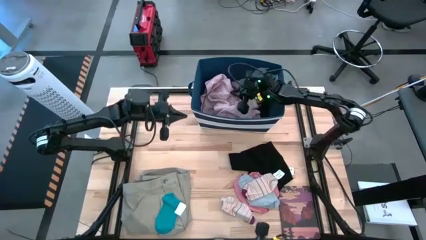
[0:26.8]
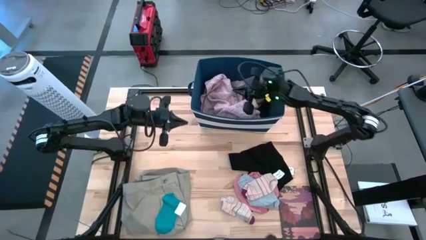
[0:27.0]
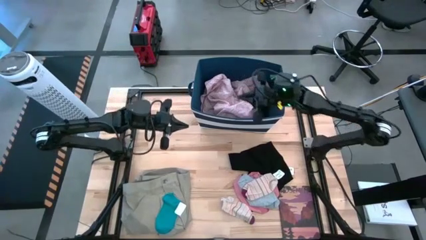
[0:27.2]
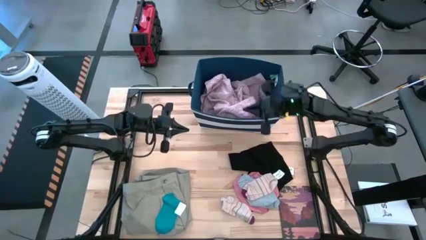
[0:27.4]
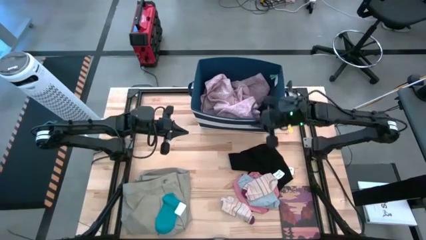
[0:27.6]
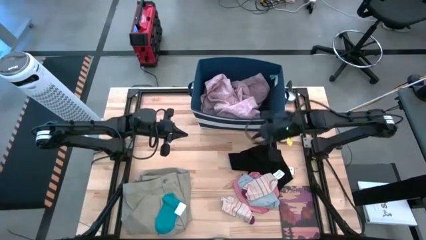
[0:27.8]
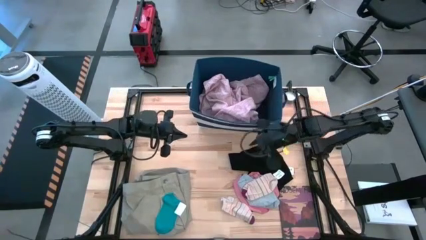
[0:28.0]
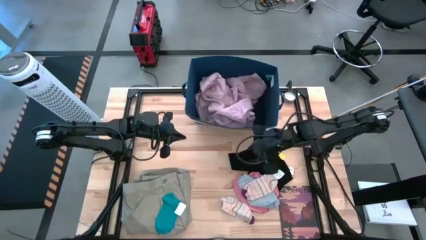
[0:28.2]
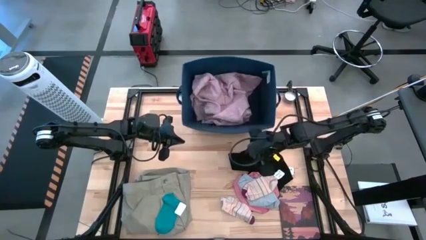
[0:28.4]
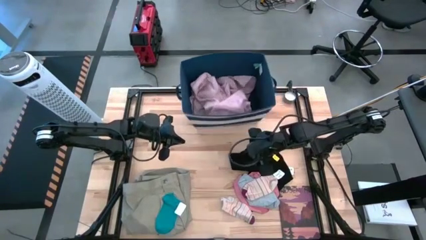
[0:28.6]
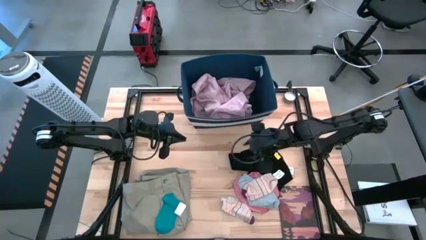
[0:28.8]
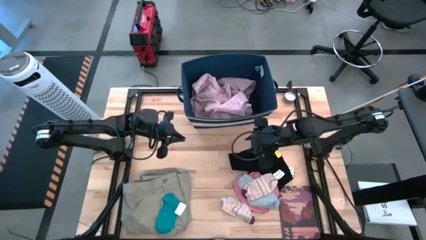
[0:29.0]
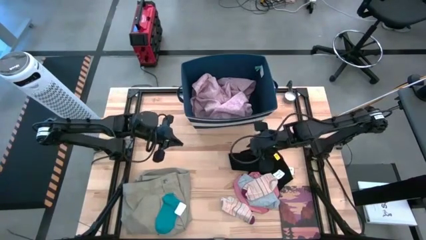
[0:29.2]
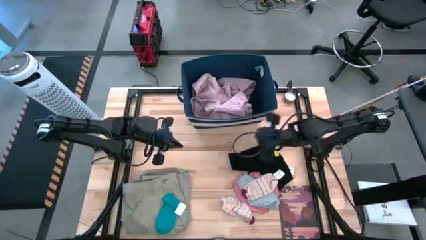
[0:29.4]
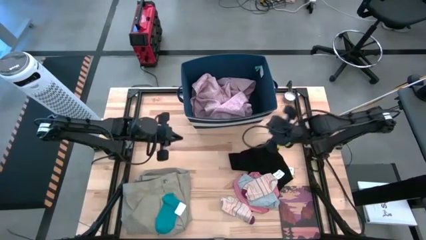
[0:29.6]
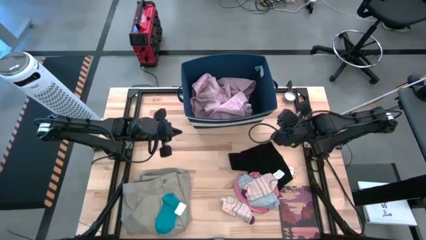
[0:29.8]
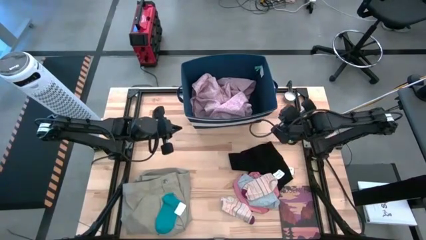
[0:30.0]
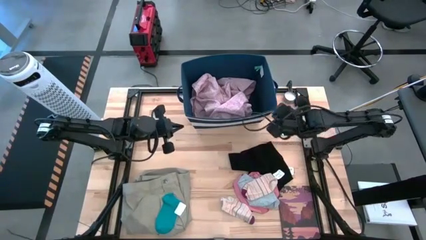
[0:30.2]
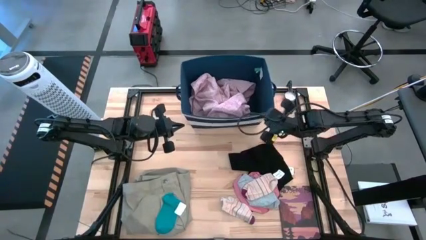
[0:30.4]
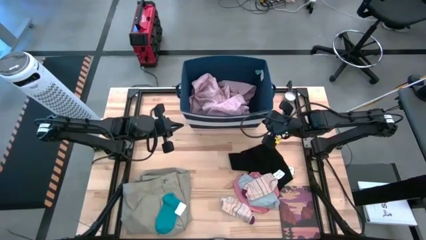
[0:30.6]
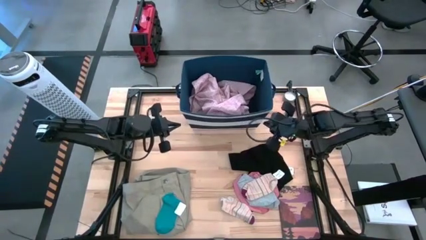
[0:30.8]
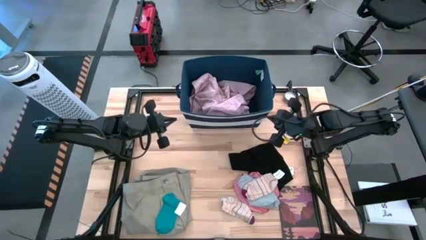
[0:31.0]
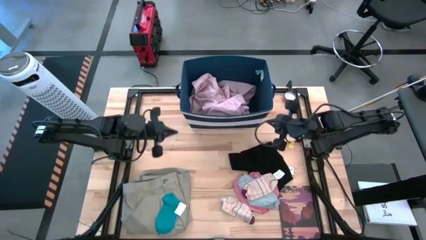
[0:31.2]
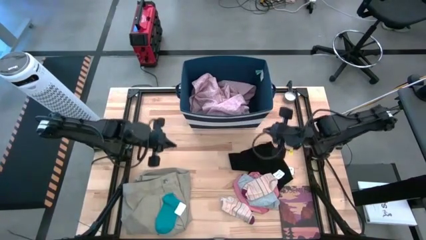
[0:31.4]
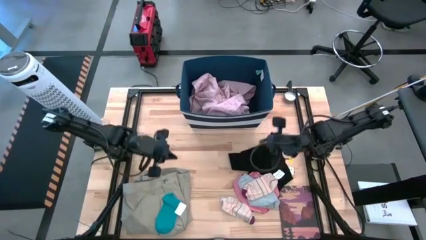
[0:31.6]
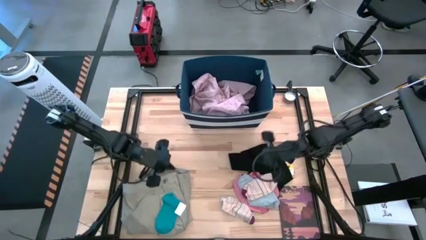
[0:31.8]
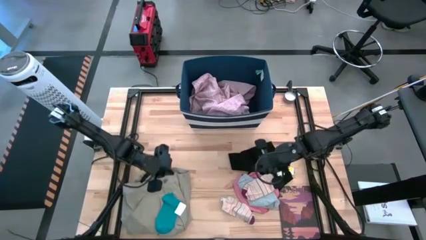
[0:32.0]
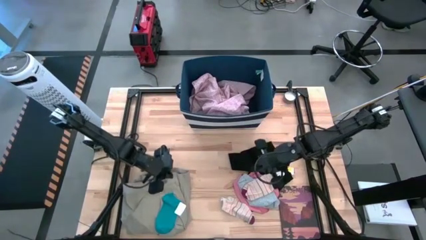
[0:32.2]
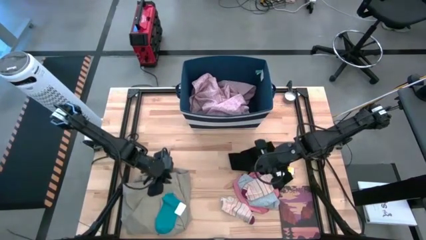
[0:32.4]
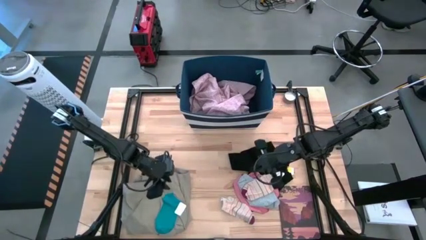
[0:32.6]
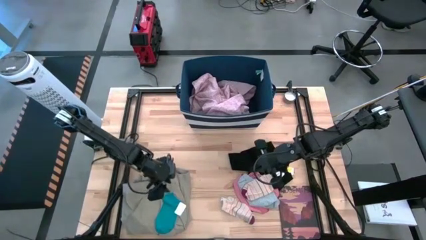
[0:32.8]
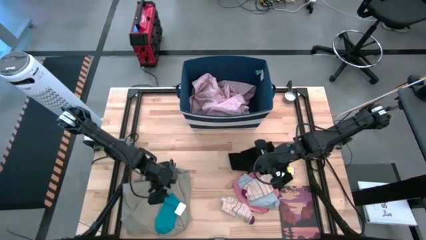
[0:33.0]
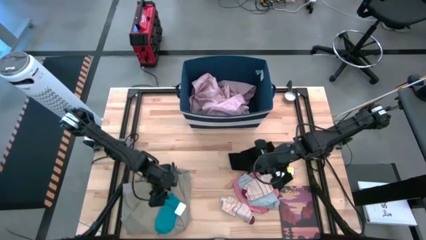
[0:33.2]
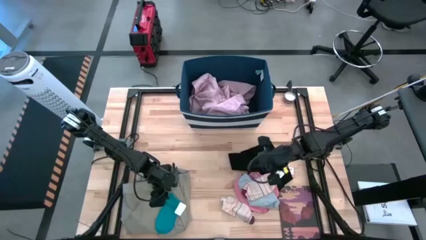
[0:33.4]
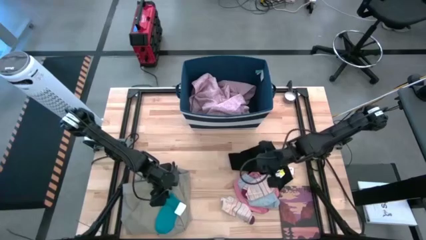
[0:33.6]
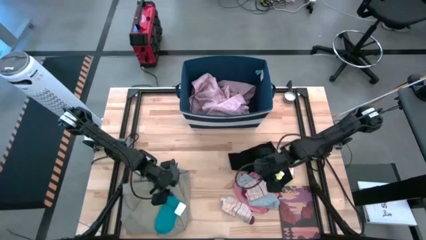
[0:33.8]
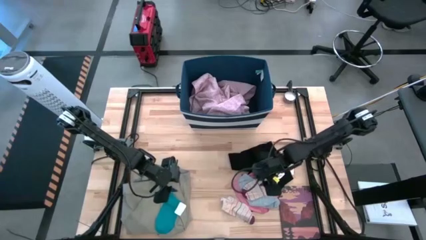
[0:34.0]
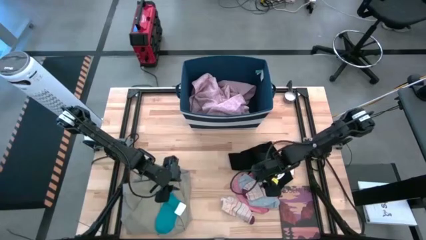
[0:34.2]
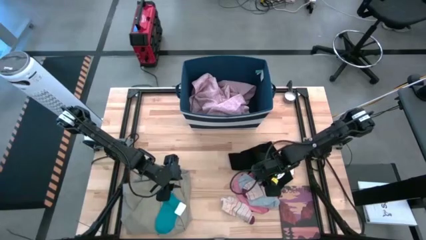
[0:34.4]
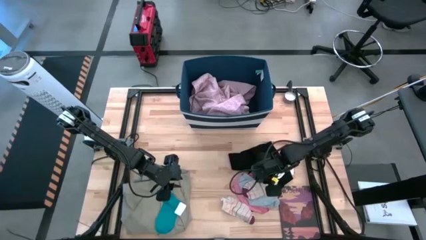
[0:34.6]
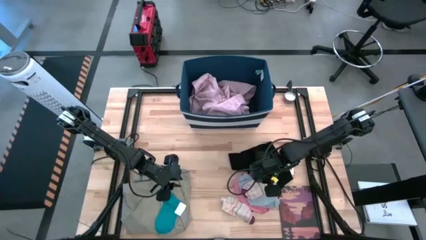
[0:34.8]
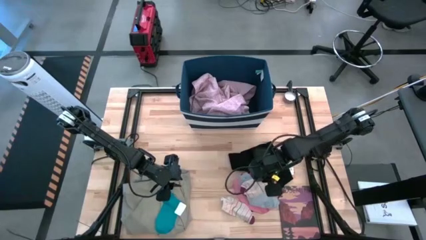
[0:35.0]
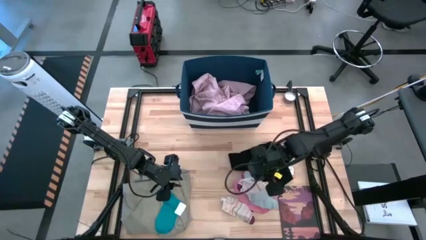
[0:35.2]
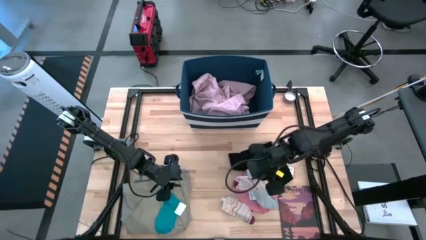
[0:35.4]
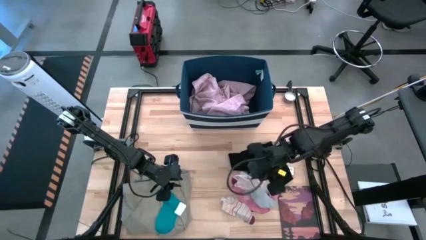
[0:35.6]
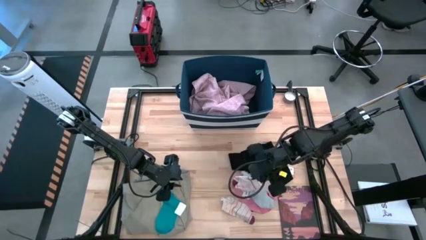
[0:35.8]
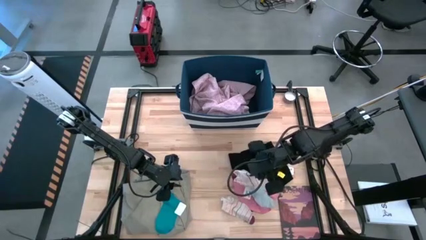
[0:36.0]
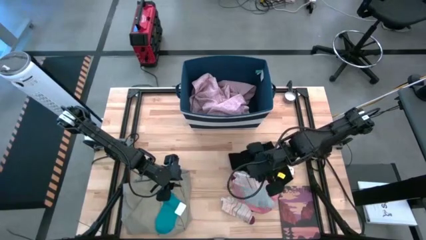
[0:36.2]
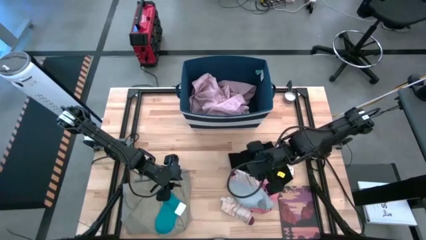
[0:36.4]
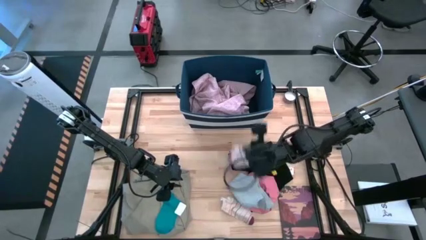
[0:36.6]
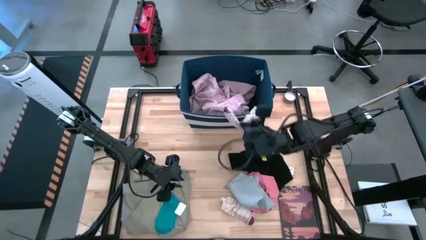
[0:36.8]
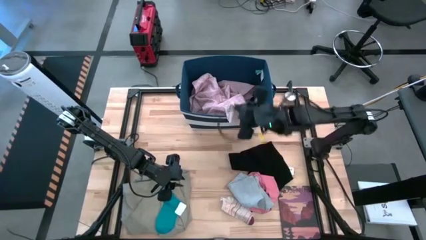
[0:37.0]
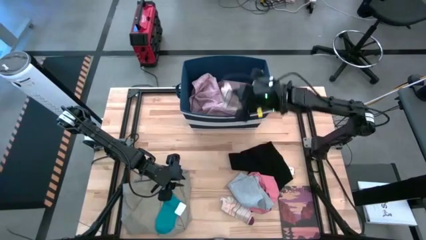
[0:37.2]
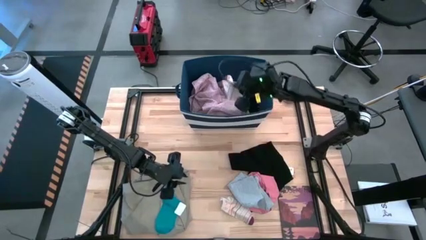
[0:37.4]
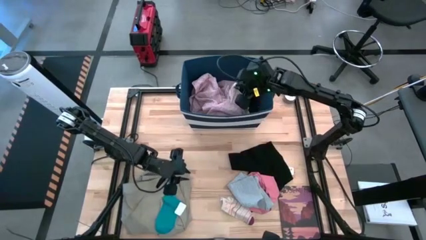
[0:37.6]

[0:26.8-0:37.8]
Task: Sort clothes
Put the top white striped sock into the blue laundry bin

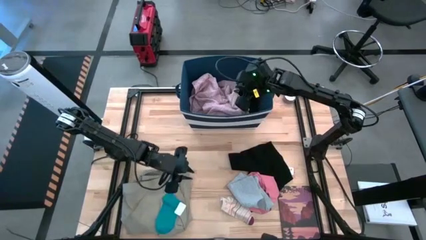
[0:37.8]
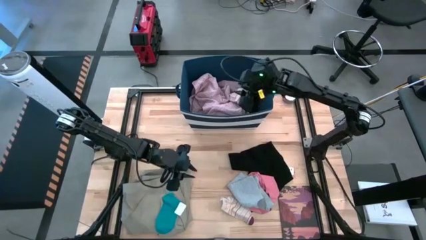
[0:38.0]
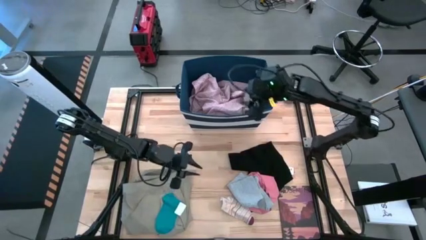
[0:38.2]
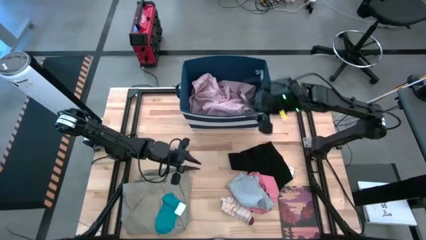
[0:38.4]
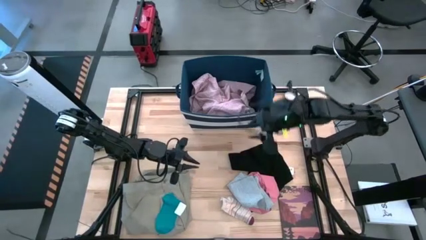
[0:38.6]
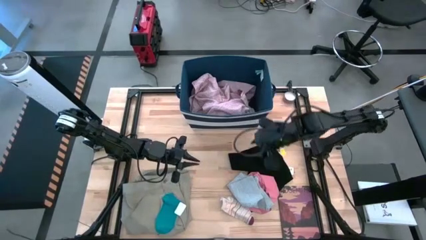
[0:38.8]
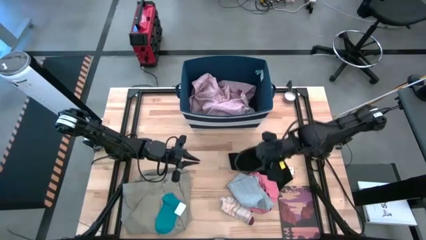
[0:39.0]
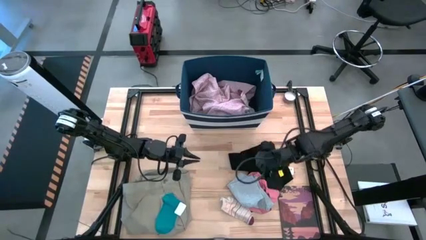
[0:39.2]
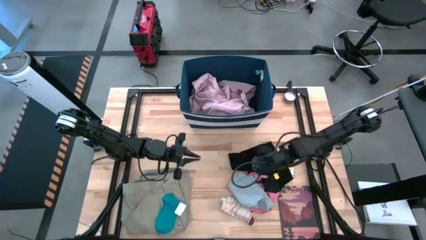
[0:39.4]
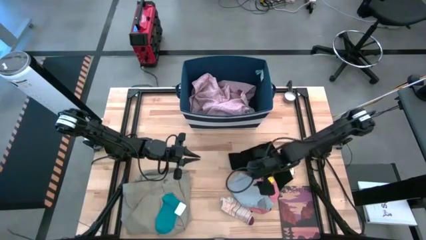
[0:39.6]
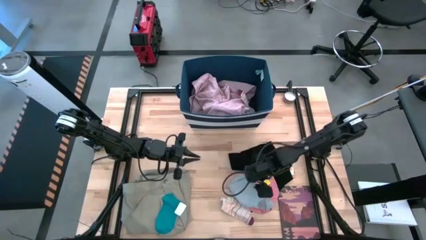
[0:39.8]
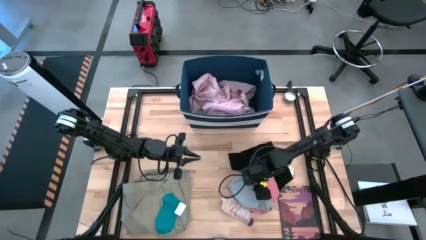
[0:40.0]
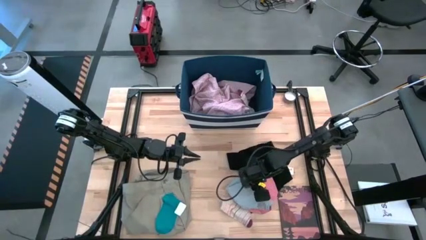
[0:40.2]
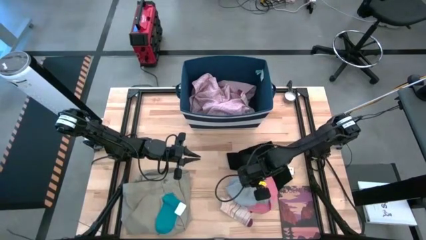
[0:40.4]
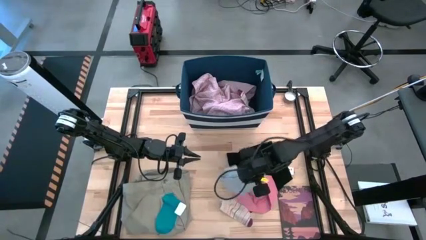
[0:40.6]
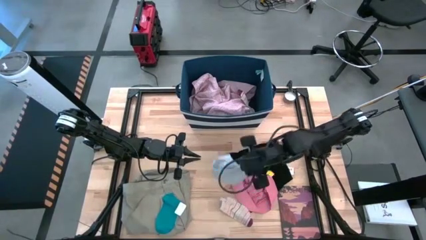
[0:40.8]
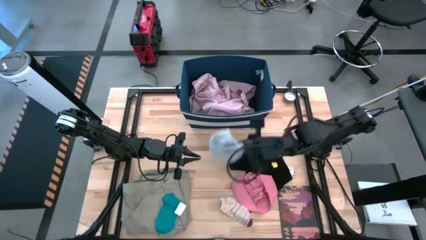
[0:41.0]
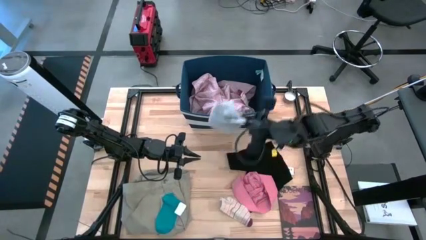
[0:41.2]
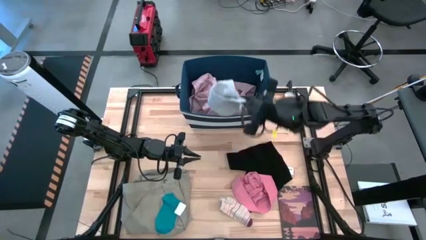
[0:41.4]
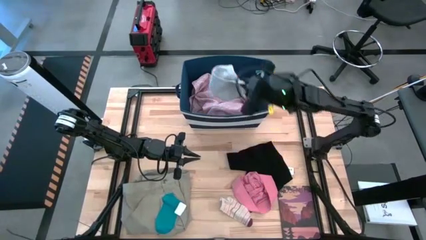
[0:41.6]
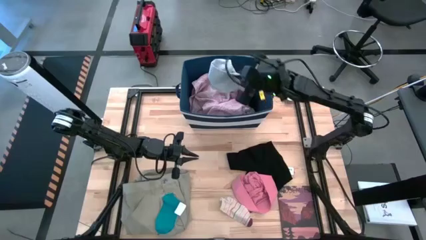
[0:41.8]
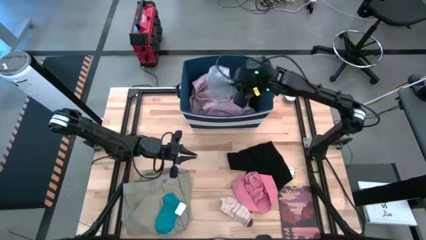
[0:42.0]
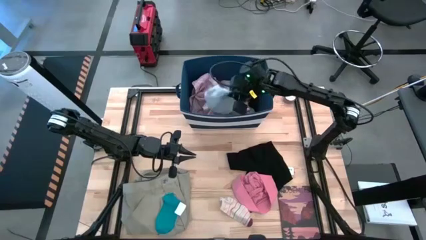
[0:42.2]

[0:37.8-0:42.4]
Put the gray boxer into the blue laundry bin
